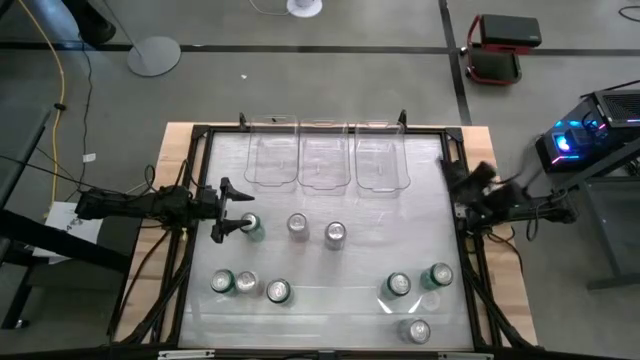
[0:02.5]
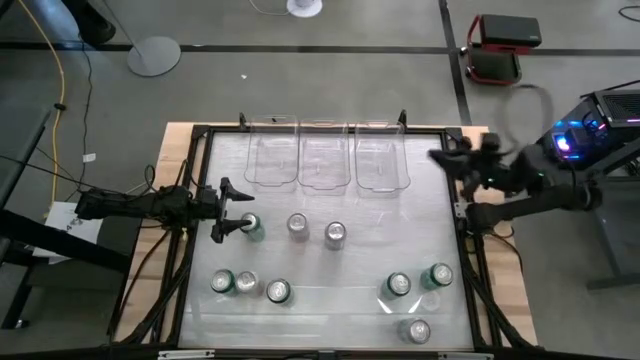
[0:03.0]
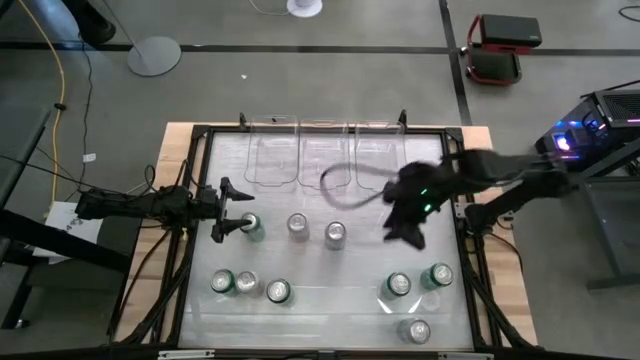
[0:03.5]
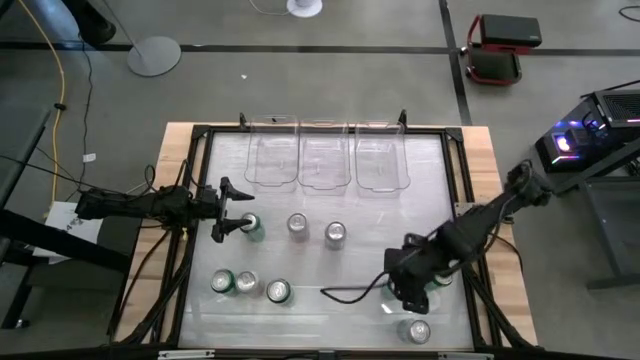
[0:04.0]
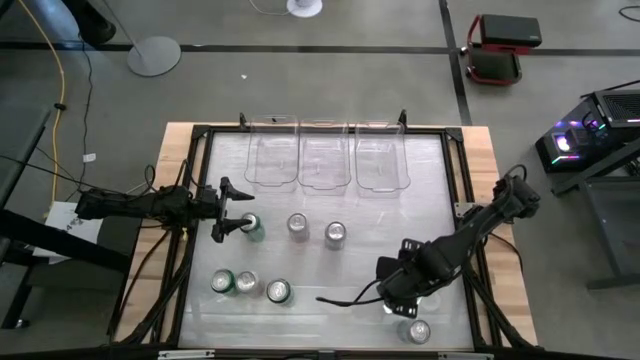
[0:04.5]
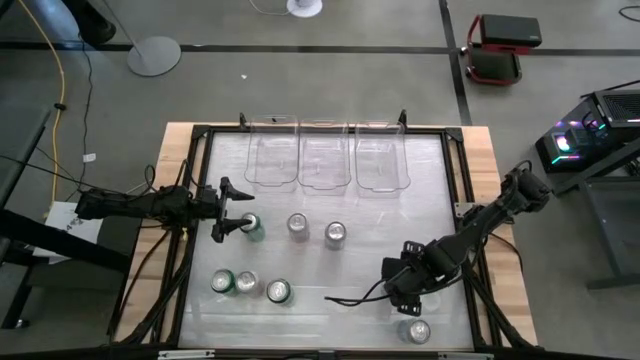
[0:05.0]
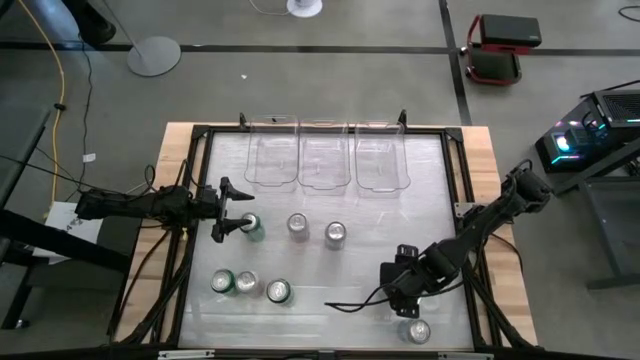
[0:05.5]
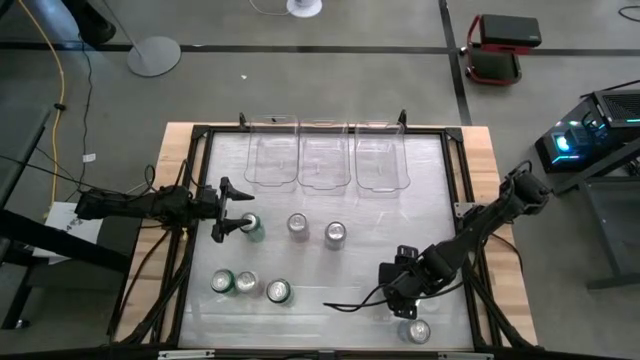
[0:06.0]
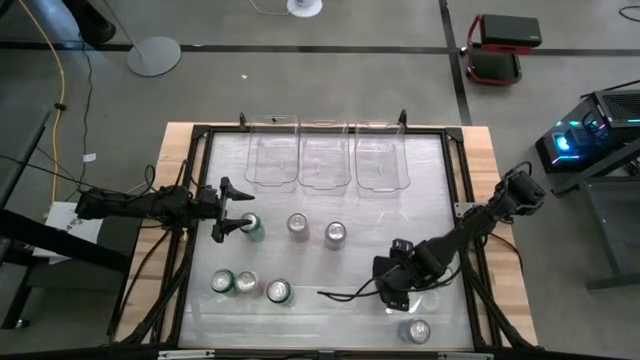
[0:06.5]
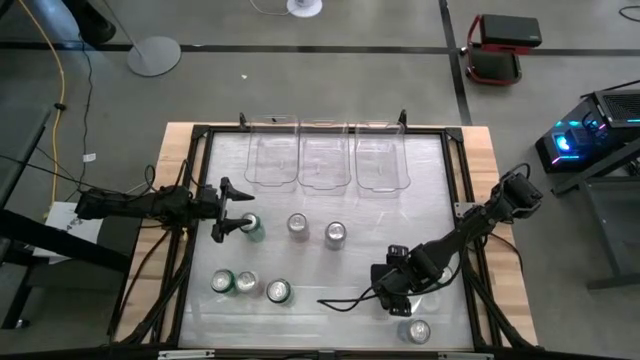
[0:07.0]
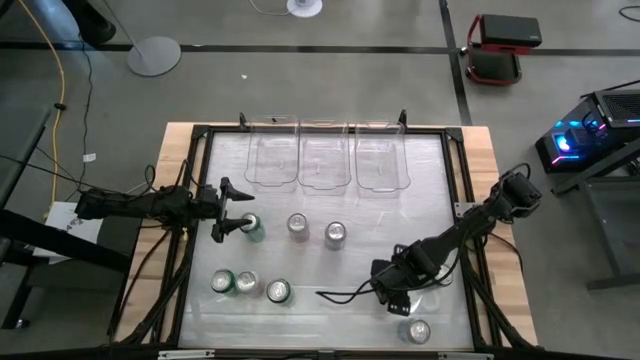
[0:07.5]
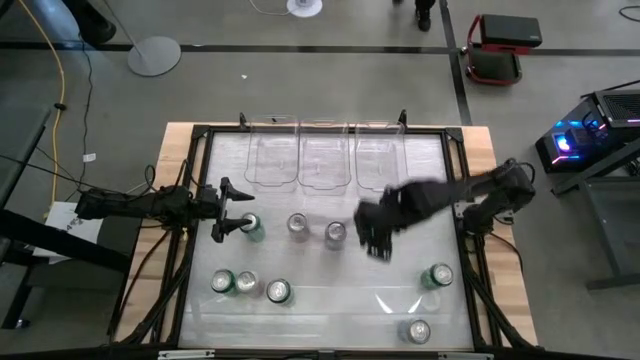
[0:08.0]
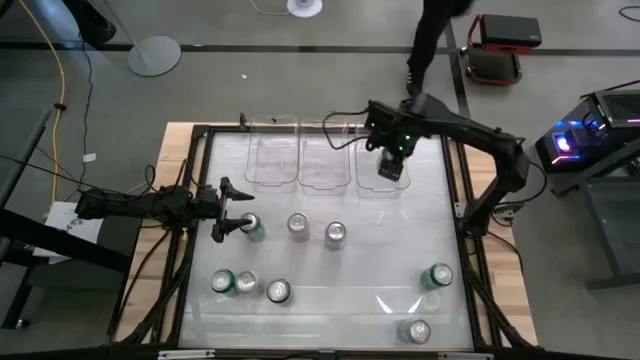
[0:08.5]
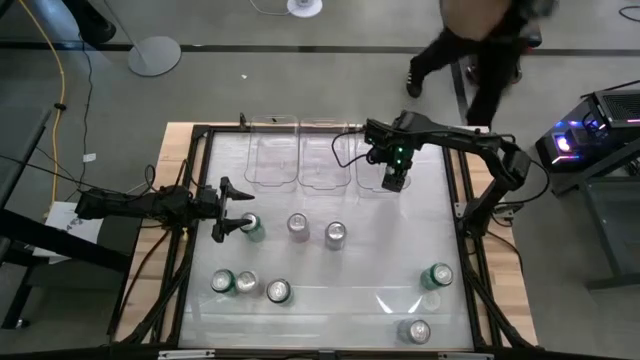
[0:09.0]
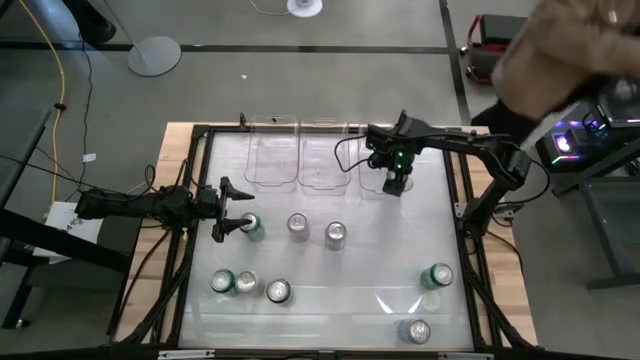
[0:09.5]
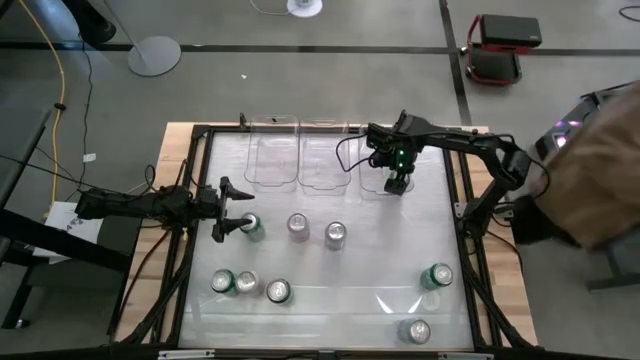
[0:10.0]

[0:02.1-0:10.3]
Task: Sort soda cans
Put green soda can into the right transparent bin

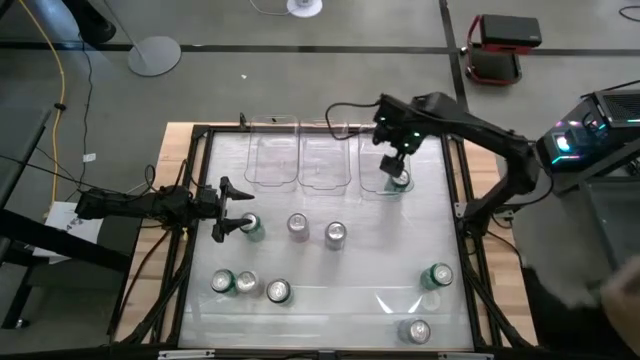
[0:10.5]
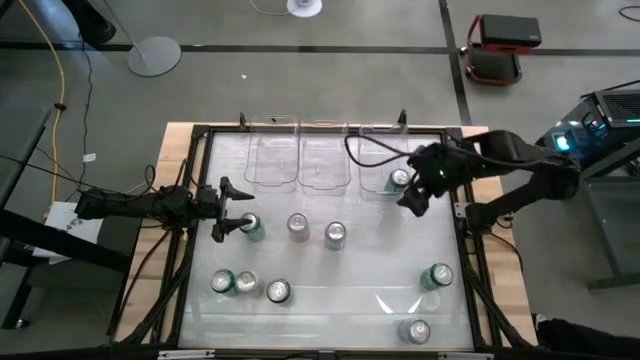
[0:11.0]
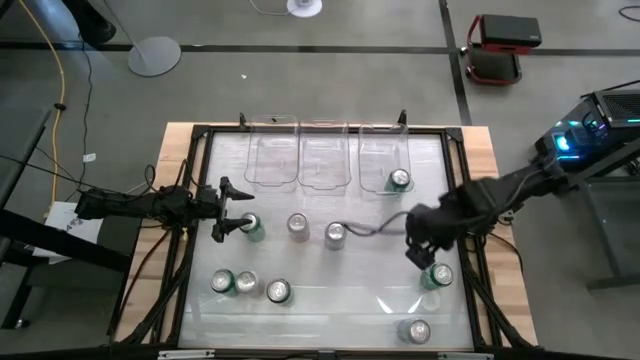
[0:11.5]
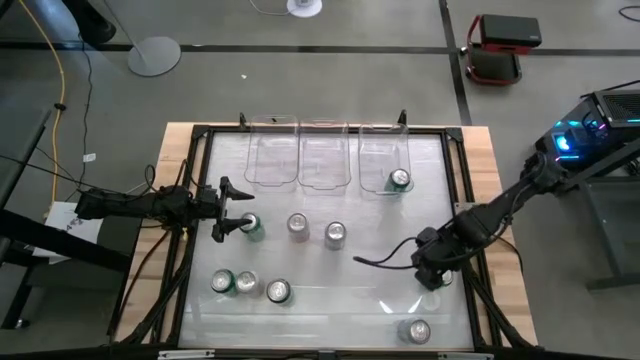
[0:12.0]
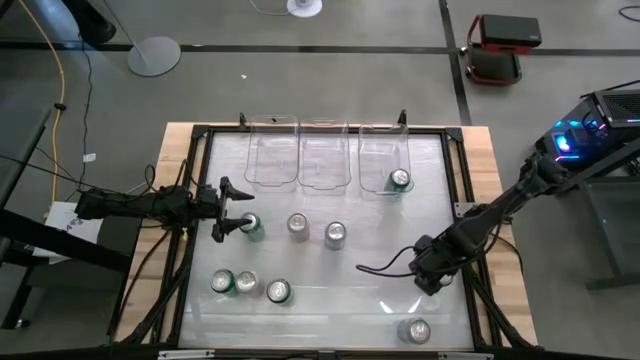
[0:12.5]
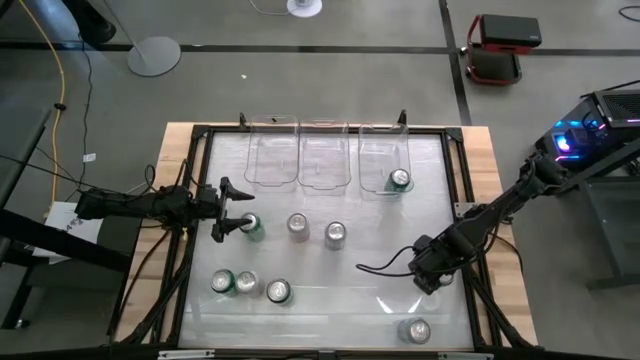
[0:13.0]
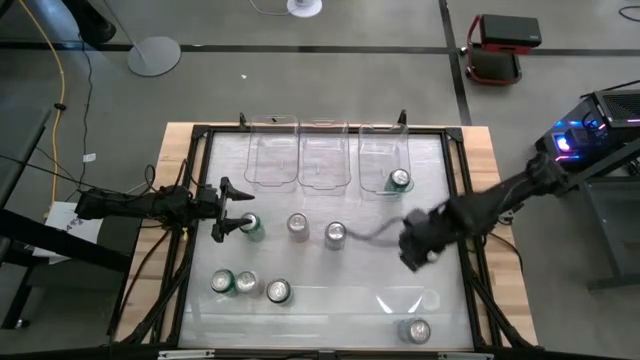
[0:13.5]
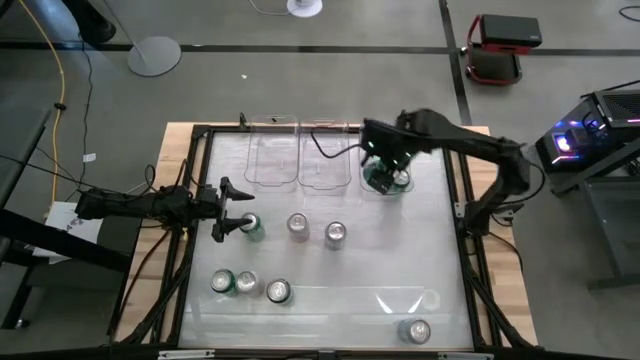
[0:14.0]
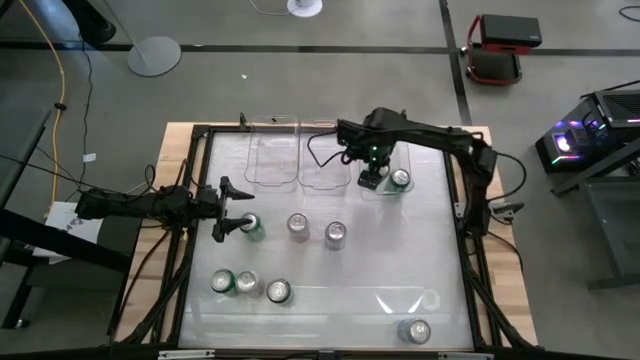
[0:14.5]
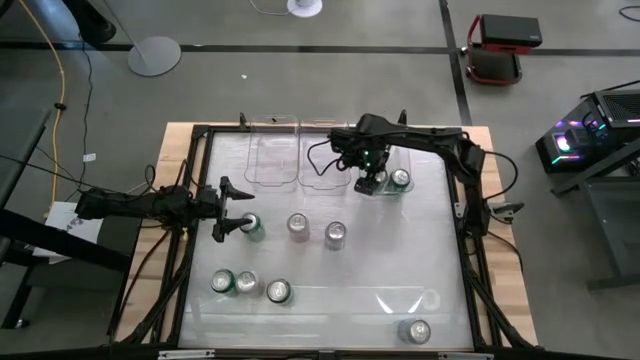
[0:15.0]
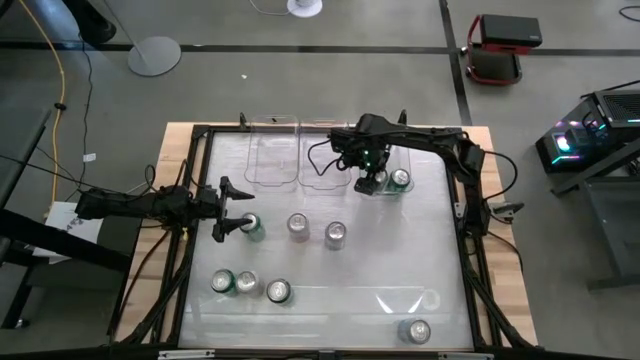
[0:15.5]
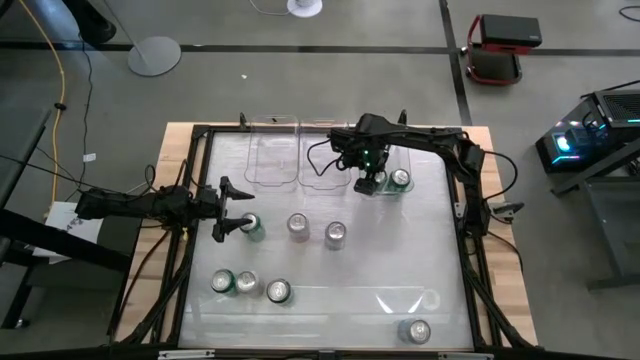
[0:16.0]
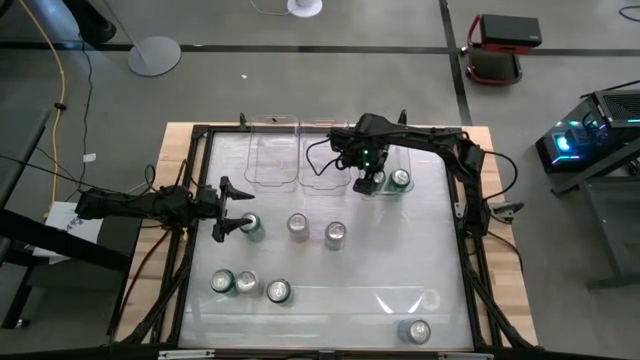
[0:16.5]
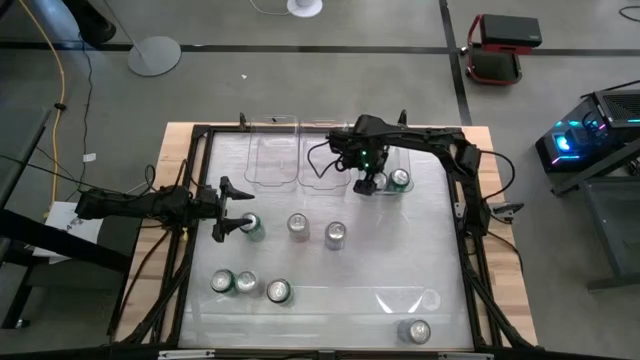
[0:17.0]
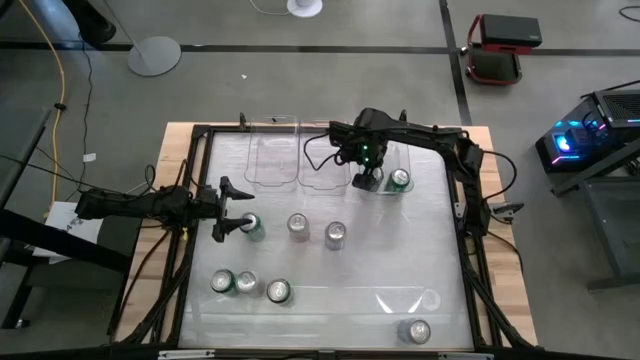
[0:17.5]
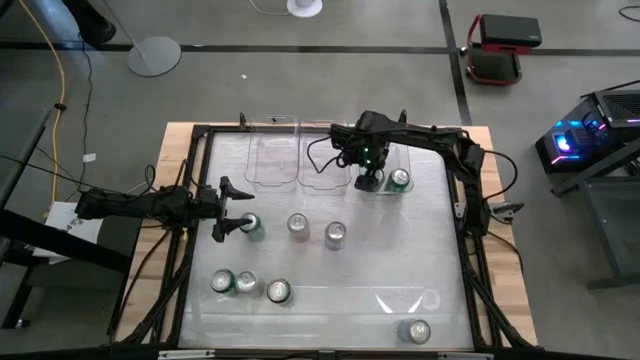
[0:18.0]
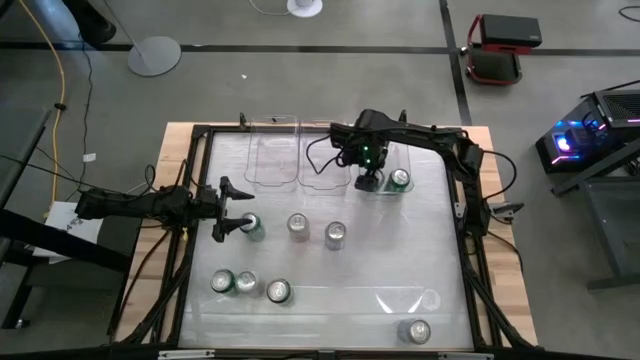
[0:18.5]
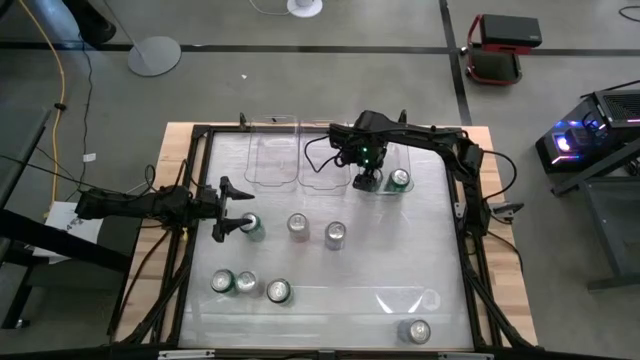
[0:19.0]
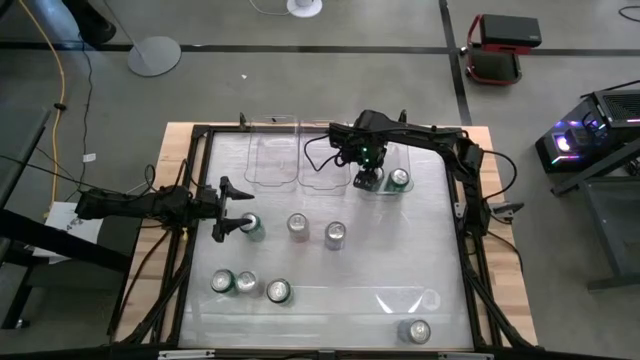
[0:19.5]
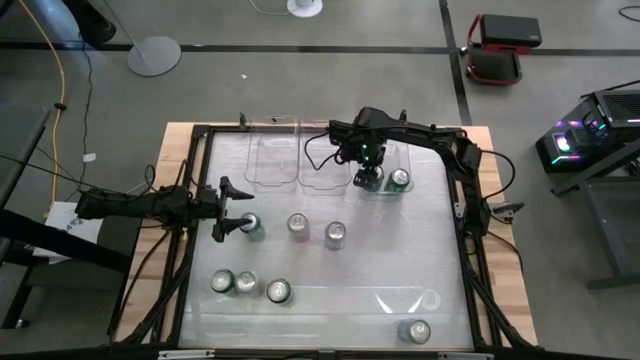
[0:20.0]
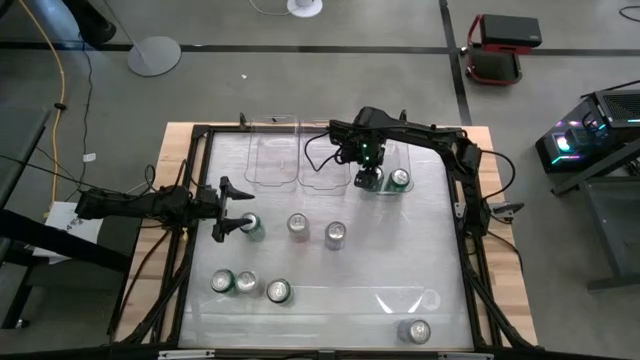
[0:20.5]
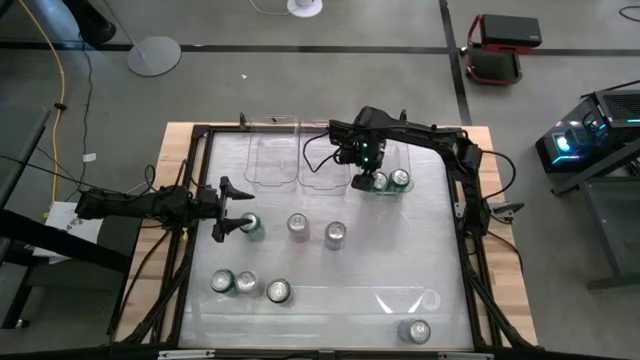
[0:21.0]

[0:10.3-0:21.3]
Put green soda can into the right transparent bin

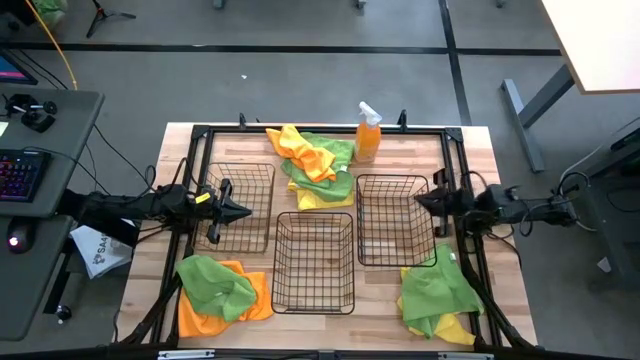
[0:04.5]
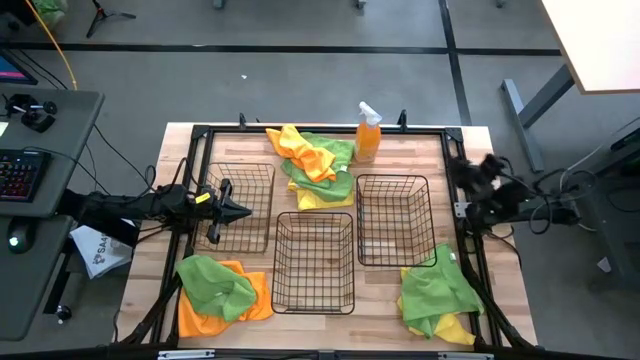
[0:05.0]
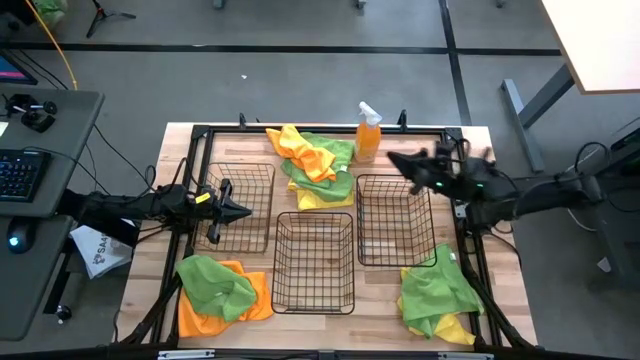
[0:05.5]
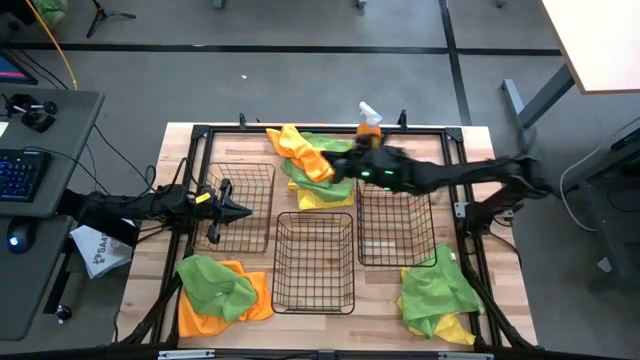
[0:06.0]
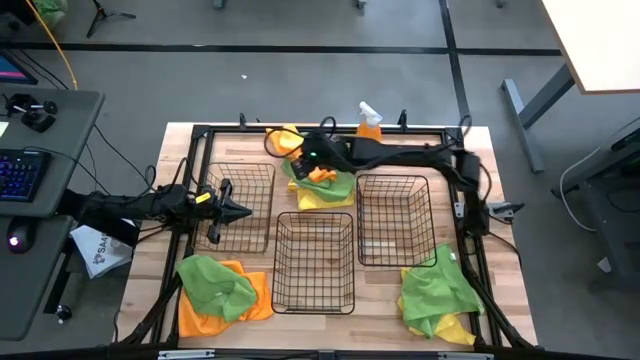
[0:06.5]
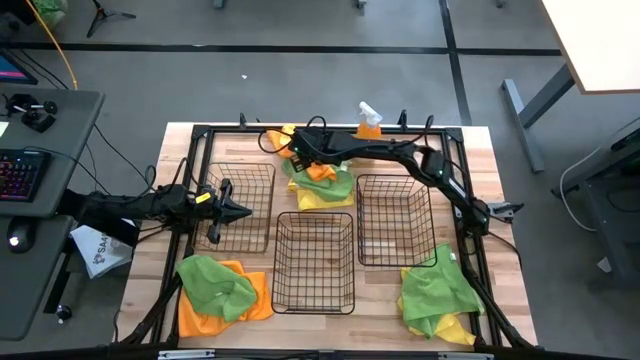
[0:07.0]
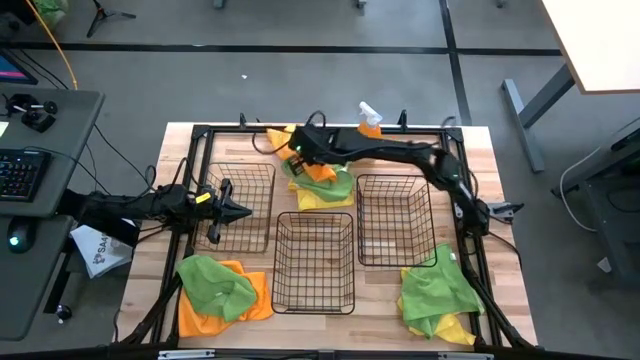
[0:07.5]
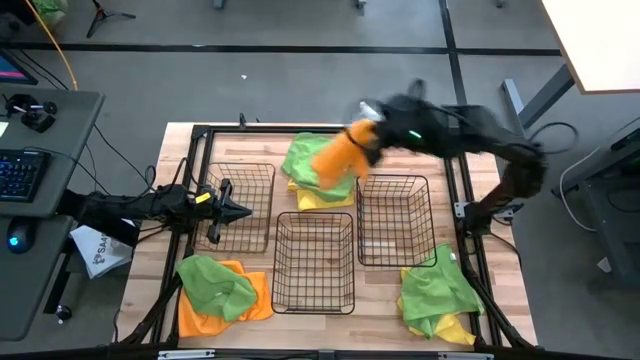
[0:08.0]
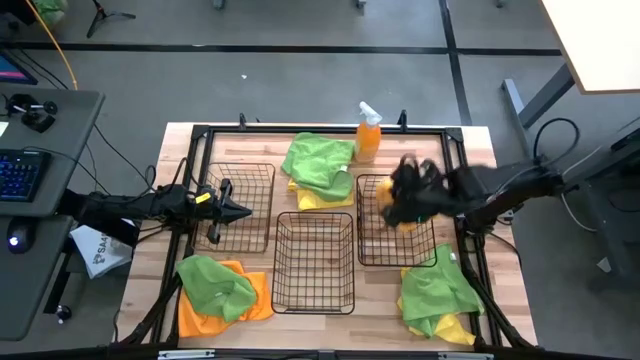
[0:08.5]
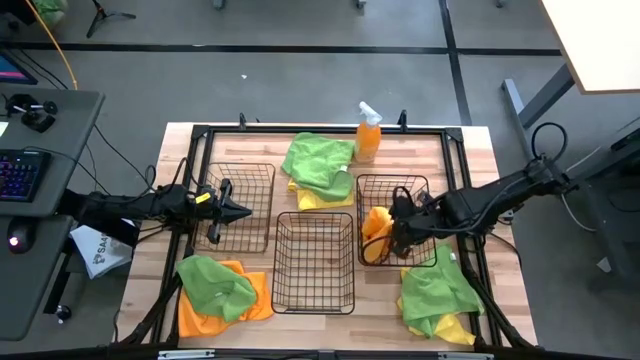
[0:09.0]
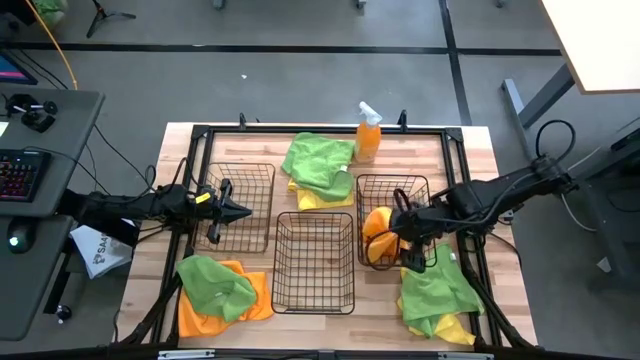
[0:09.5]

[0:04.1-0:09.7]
Task: Sort microfiber towel by color & place in baskets
Put the top orange towel into the right wire basket
